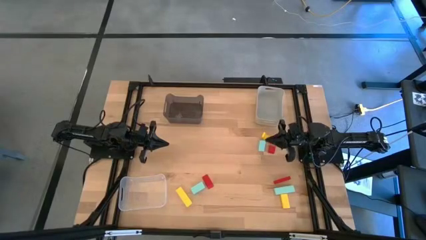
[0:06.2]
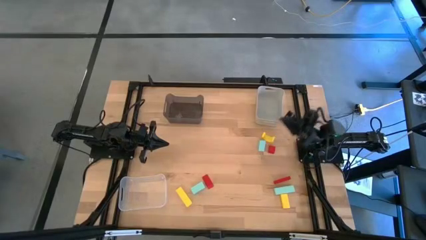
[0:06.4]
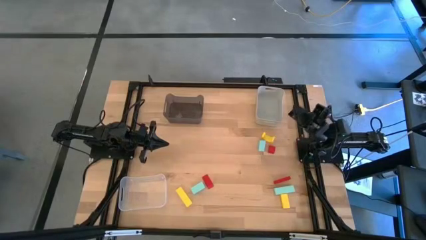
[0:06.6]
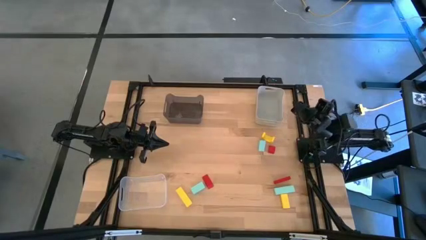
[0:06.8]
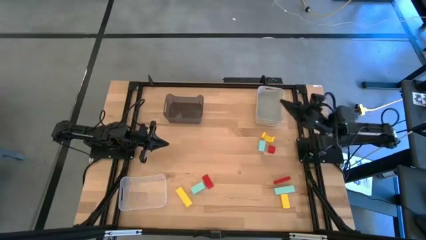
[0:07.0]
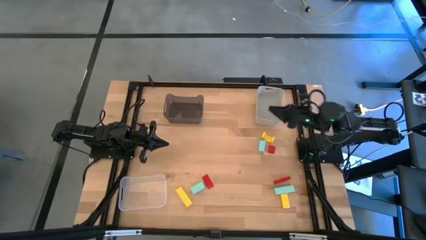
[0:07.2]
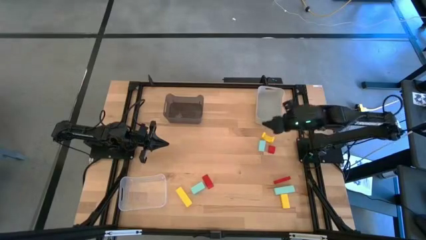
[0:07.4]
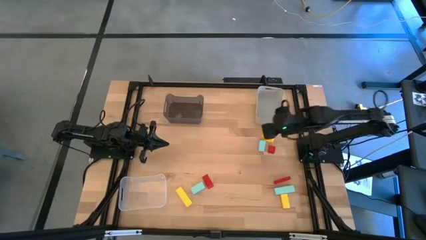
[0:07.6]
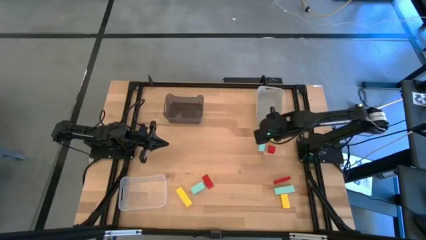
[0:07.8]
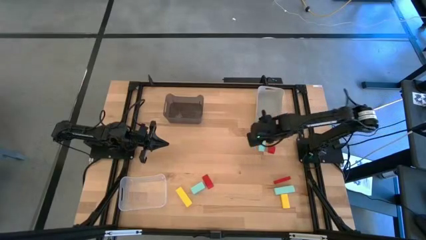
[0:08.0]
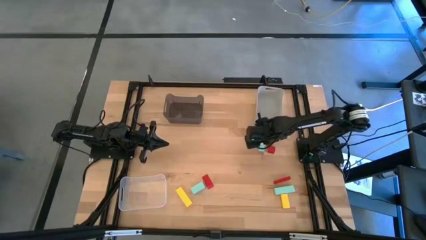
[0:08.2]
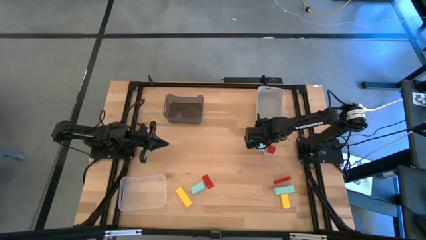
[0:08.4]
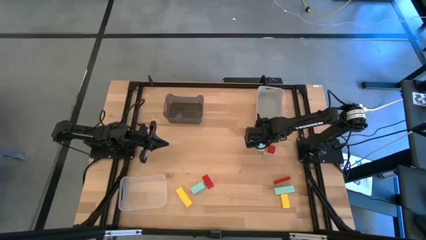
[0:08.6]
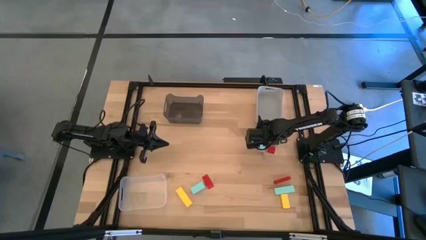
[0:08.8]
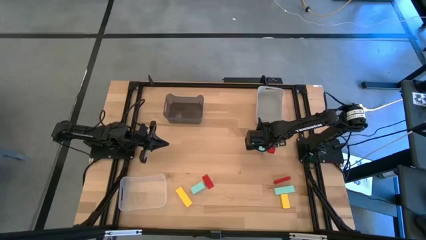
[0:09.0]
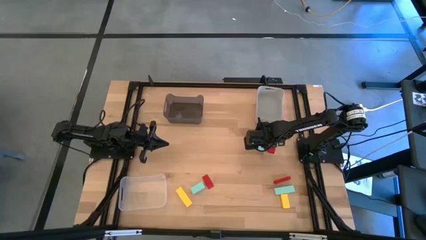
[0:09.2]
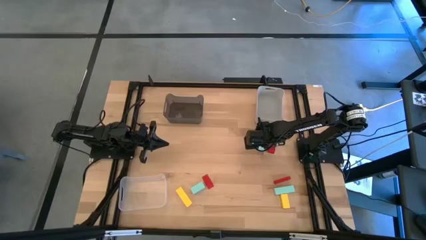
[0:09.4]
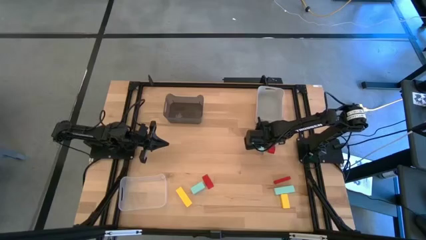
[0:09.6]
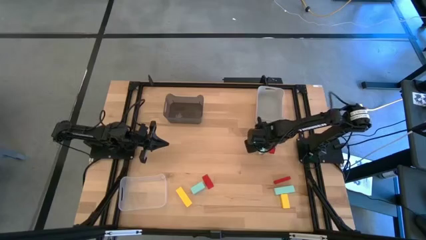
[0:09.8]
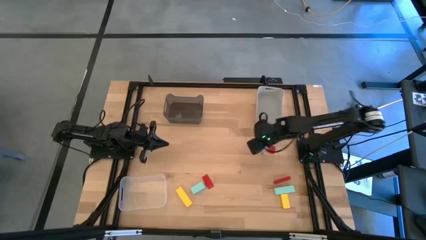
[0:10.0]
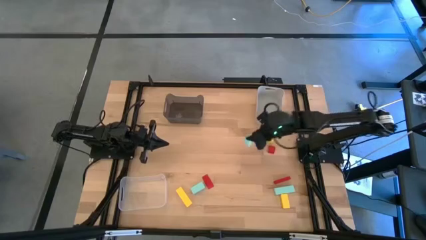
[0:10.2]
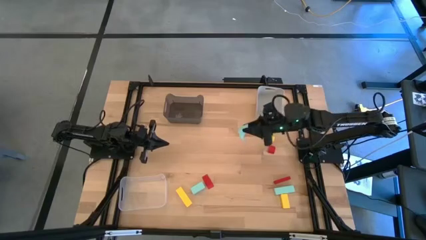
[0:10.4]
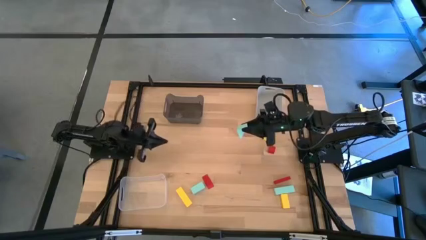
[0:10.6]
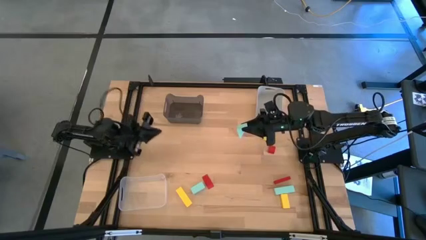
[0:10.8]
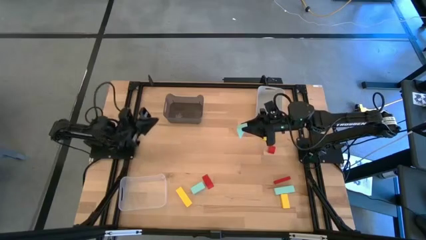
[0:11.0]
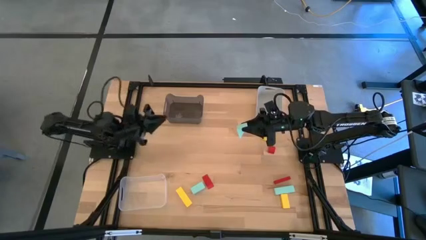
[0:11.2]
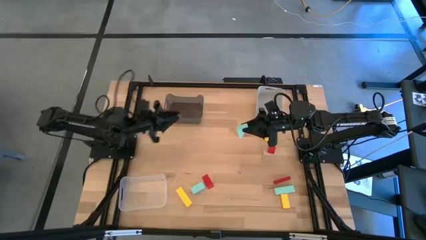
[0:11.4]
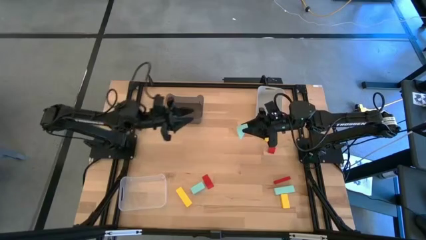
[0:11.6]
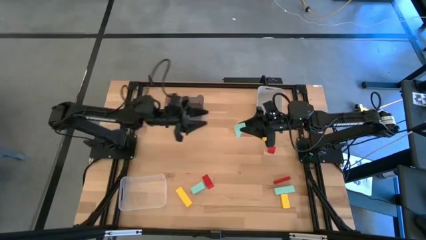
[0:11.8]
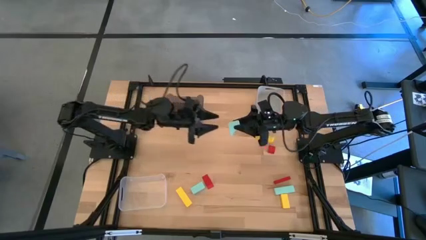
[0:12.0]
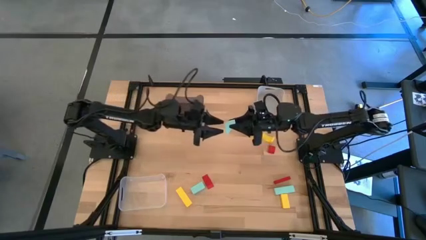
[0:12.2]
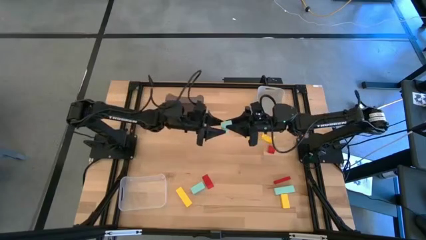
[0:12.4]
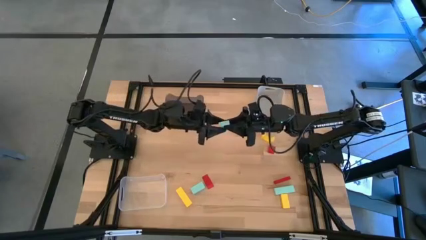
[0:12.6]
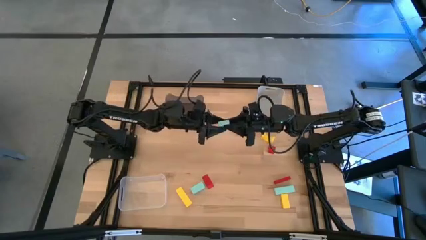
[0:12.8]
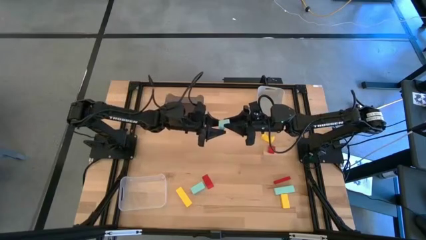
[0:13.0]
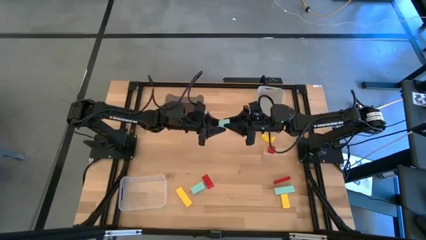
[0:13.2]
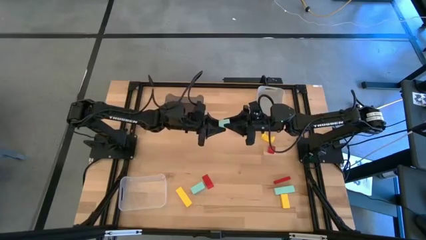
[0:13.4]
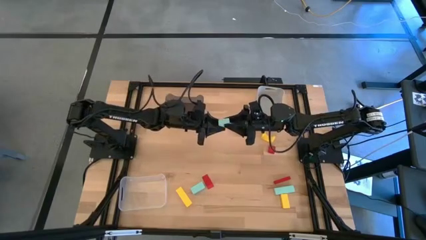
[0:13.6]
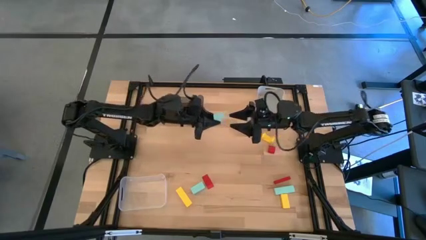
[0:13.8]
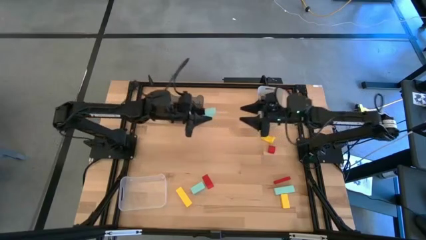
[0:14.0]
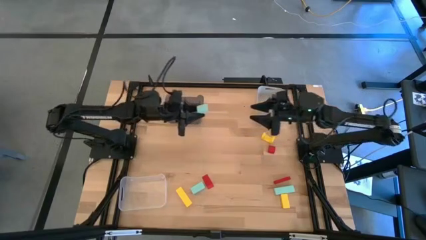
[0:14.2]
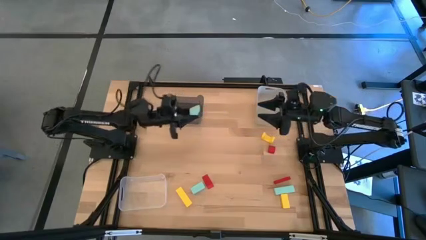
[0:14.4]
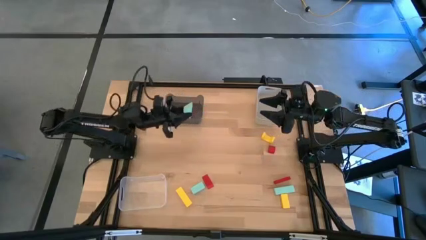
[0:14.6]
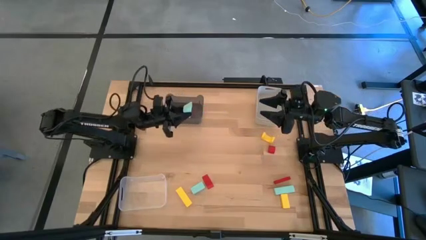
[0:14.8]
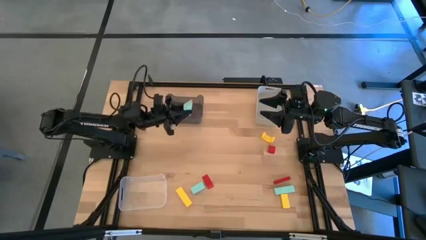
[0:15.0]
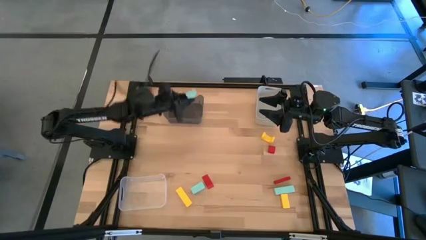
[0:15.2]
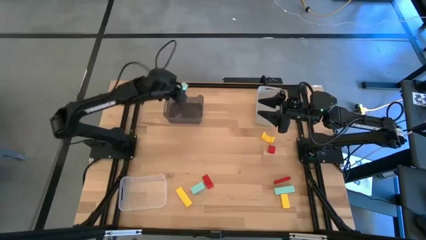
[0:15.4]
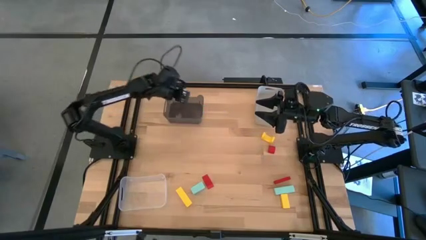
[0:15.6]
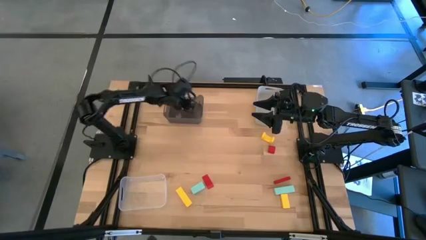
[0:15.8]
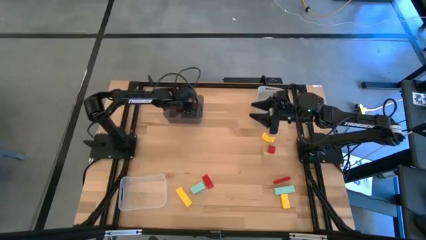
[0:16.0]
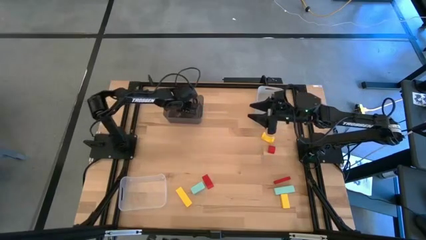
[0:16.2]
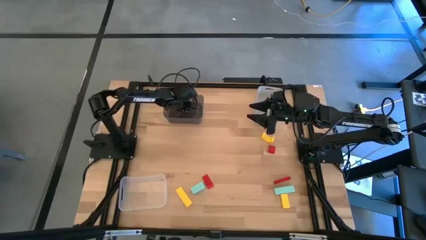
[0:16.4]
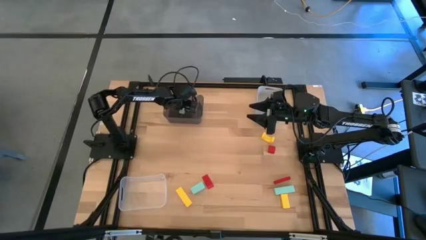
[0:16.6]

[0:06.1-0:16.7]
Task: Sort & place blocks by color
Put the top light blue block into the black bin

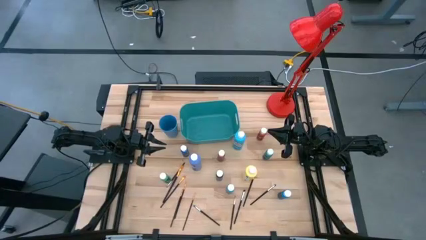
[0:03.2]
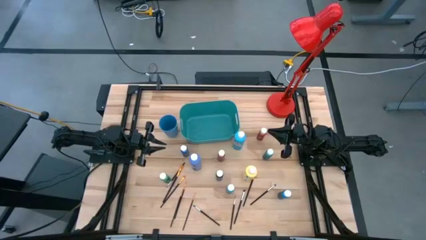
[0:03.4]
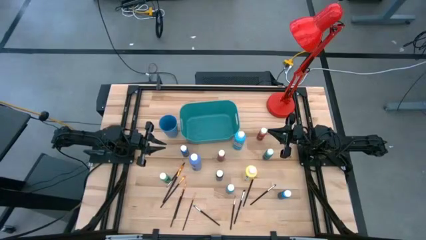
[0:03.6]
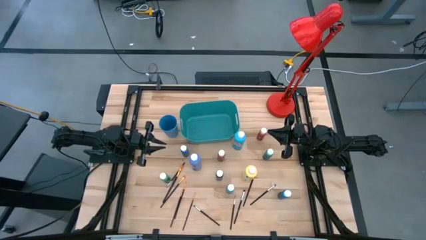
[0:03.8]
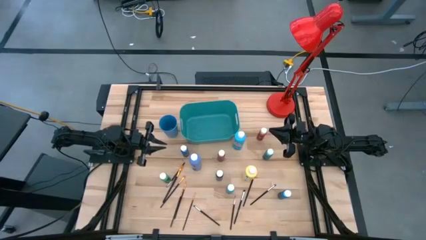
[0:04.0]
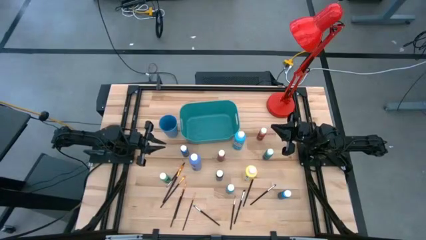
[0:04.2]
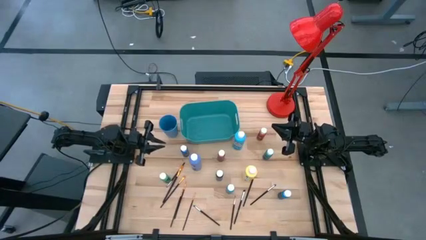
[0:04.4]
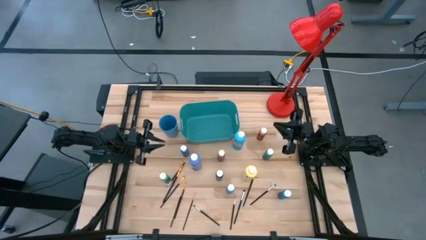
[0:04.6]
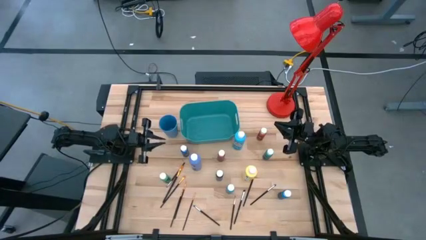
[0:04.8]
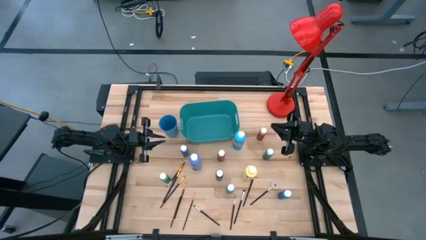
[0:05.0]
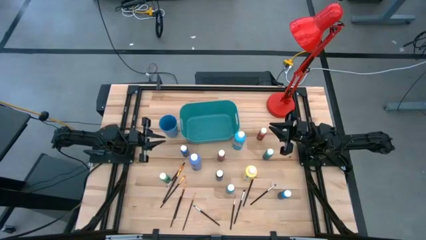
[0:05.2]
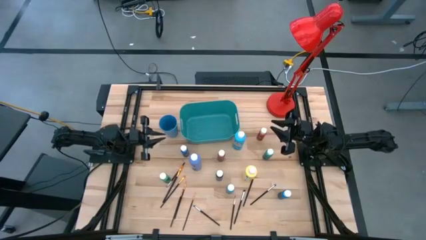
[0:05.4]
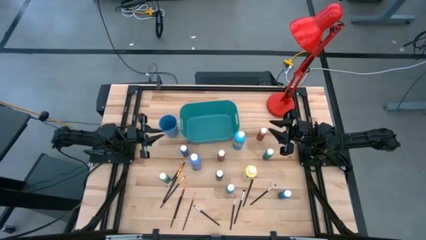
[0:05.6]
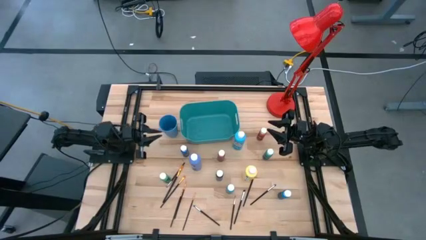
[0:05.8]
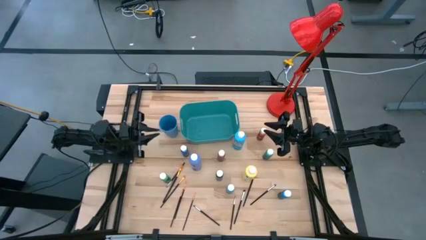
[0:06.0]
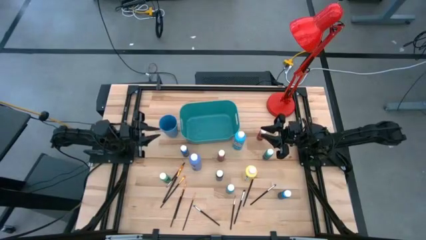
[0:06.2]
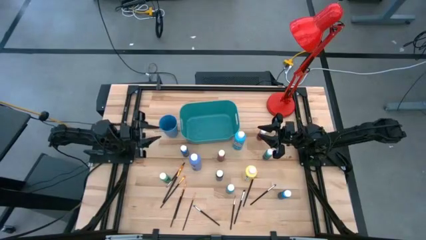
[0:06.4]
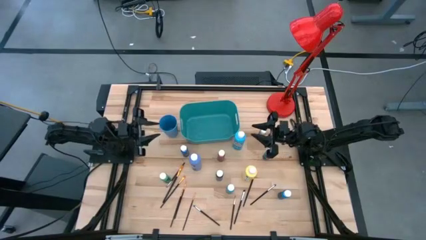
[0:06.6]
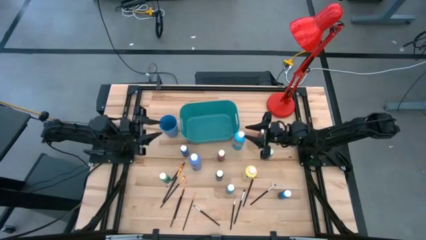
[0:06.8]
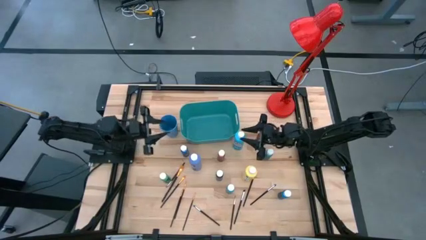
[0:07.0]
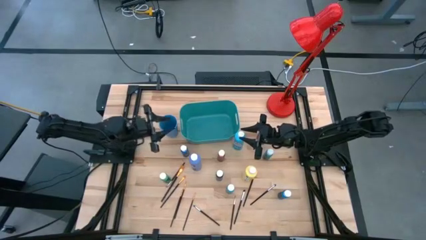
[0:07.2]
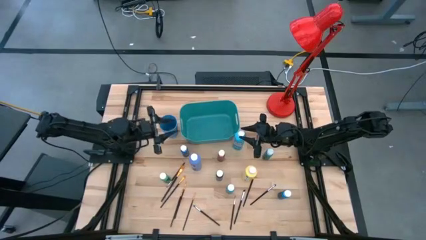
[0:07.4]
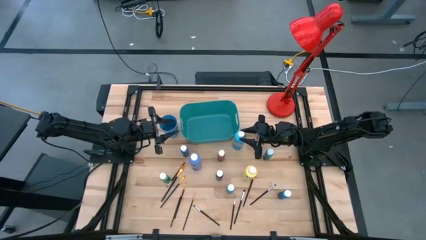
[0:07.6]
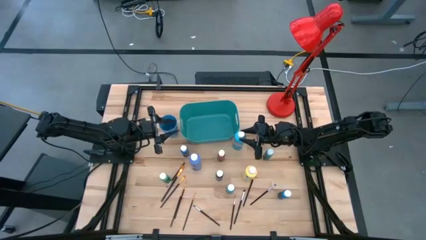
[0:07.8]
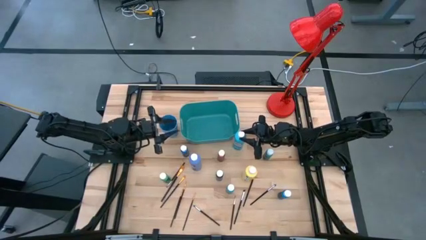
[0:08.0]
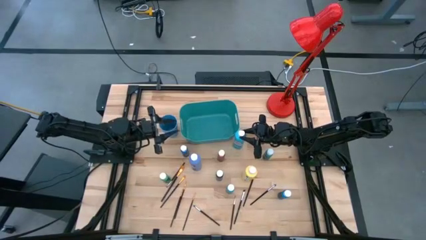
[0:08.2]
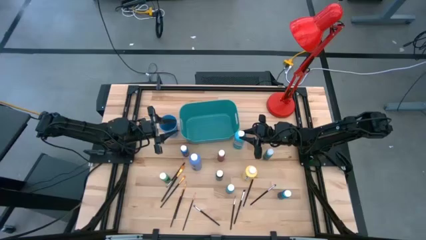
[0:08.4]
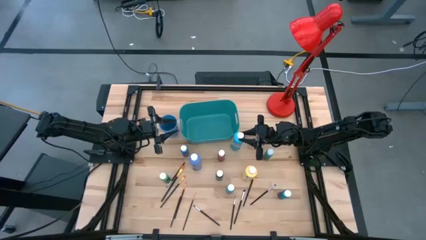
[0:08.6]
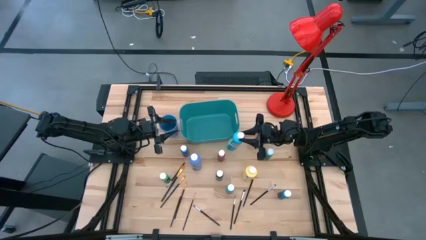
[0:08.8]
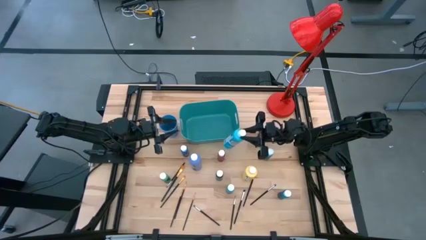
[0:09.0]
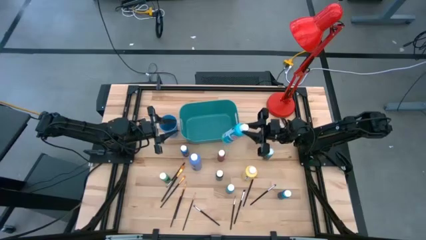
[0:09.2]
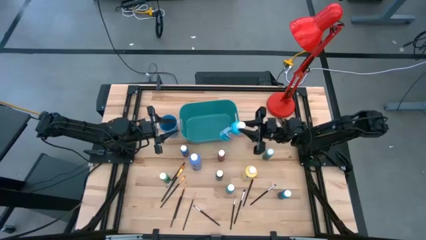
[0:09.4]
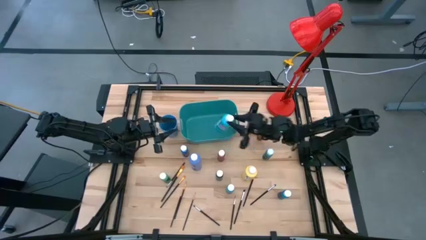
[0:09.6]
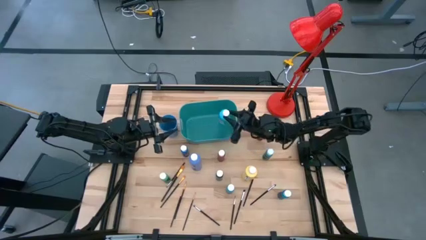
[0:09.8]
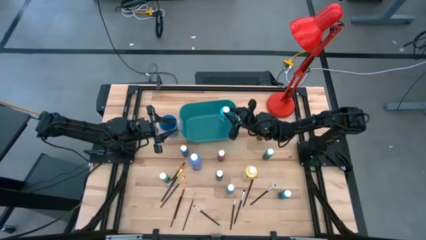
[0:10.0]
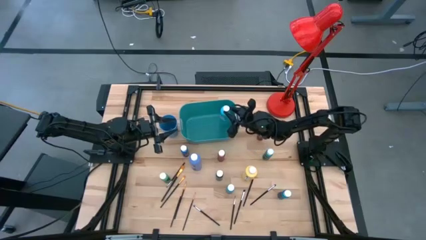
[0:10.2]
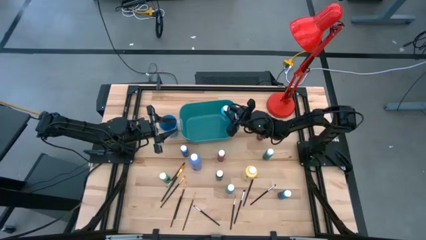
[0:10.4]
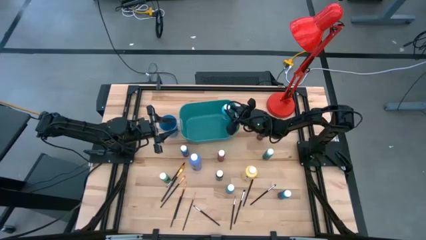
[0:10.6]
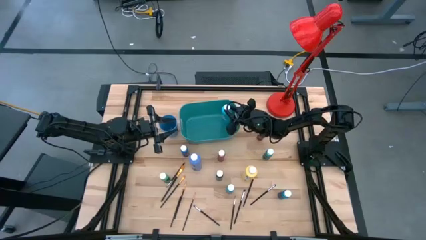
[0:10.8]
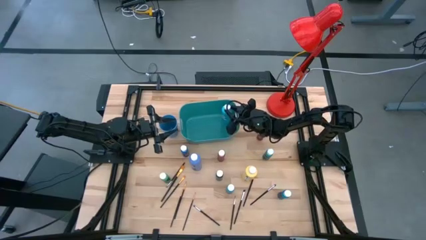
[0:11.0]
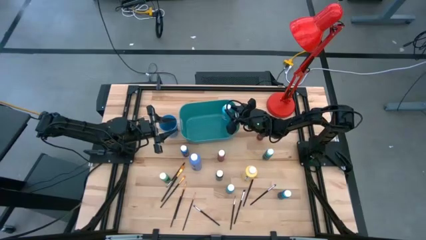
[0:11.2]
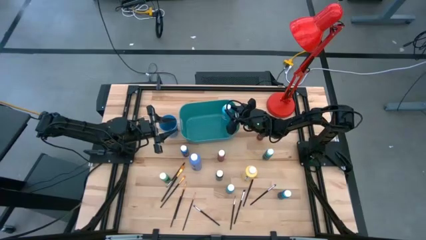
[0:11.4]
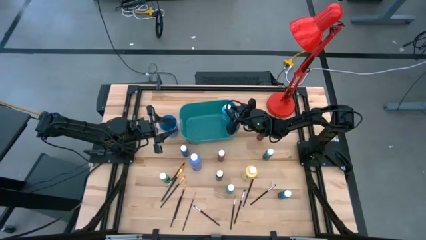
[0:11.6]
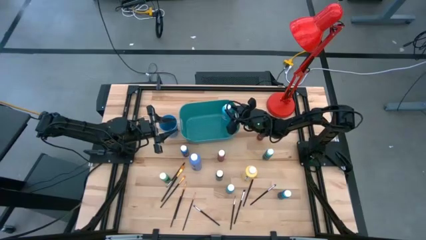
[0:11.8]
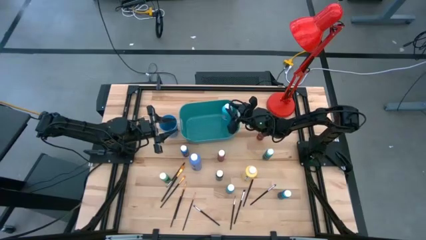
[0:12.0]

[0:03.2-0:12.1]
Task: Pick & Place Paint Supplies
Put the large light blue paint bottle into the green bin
